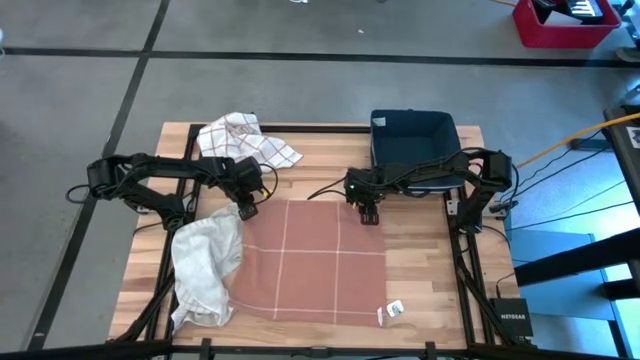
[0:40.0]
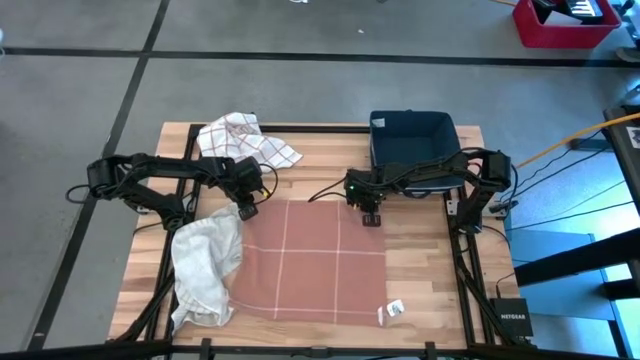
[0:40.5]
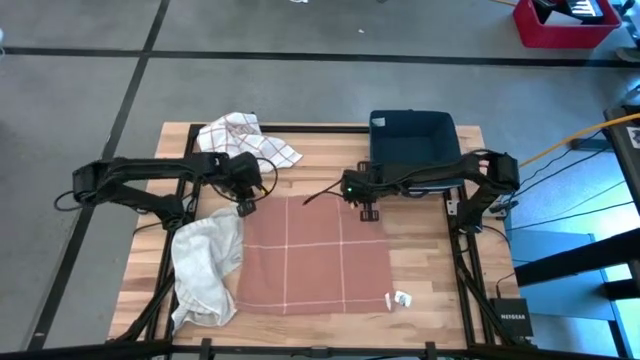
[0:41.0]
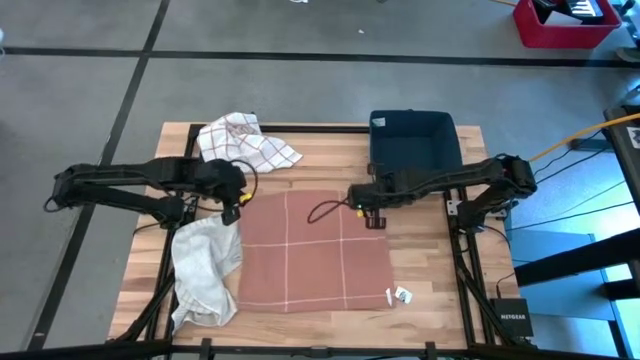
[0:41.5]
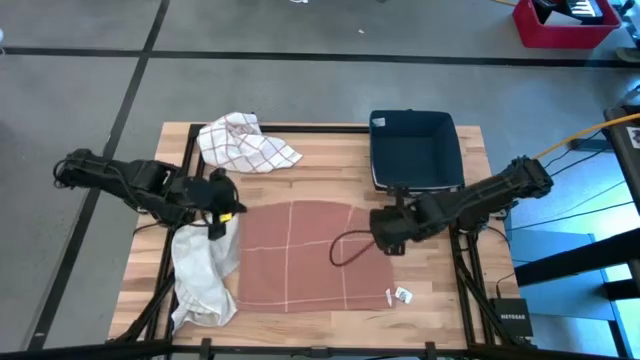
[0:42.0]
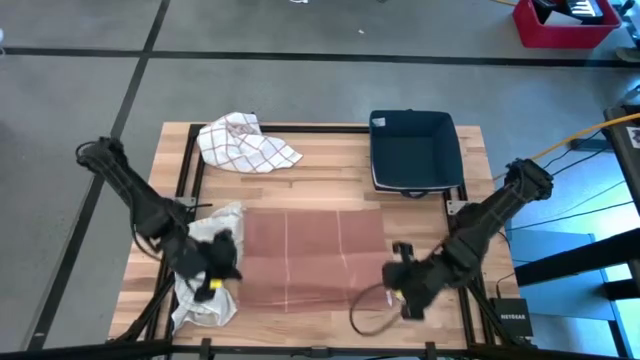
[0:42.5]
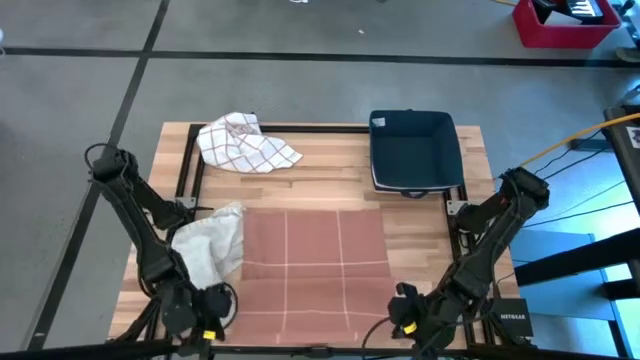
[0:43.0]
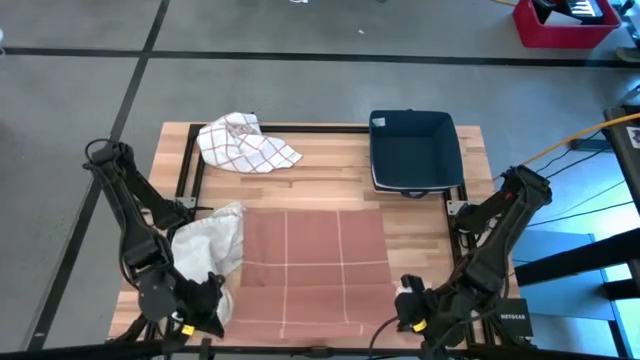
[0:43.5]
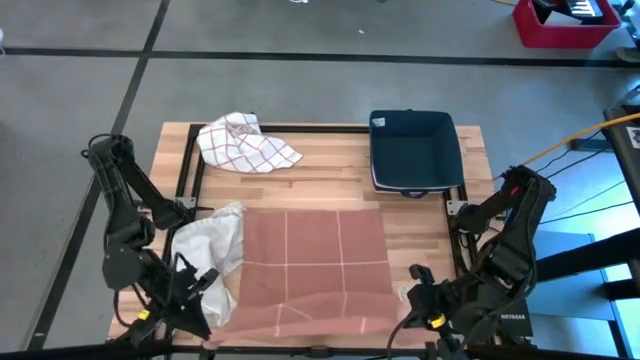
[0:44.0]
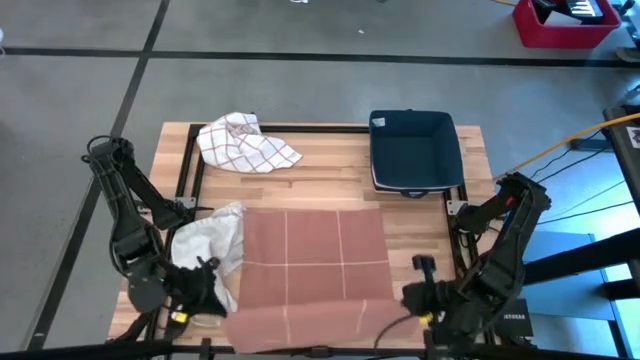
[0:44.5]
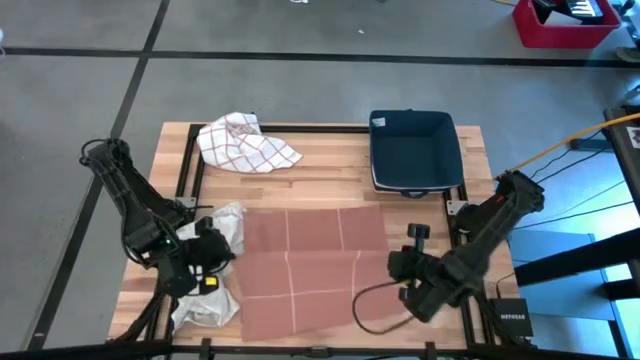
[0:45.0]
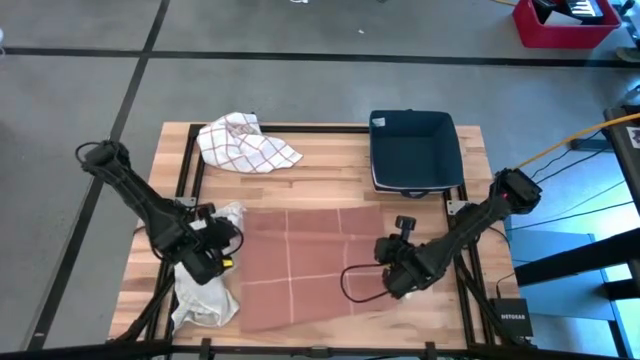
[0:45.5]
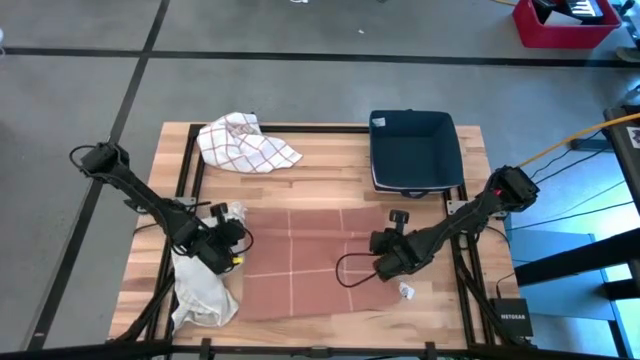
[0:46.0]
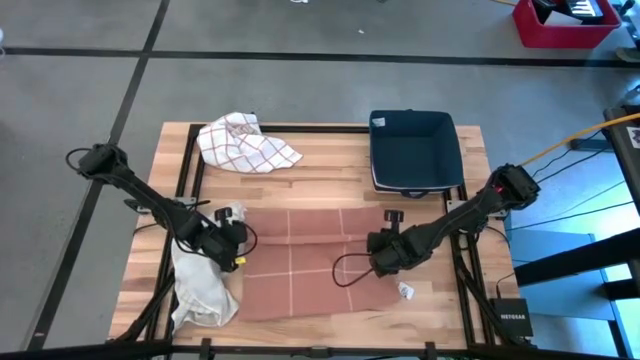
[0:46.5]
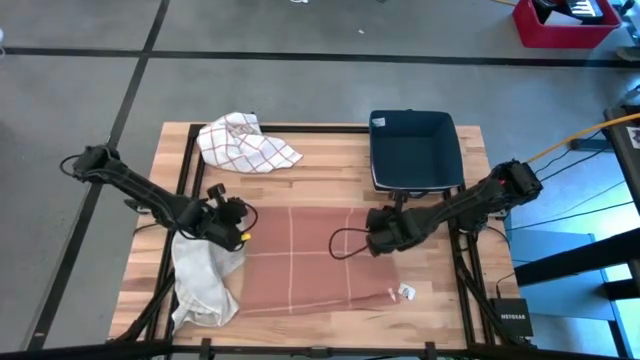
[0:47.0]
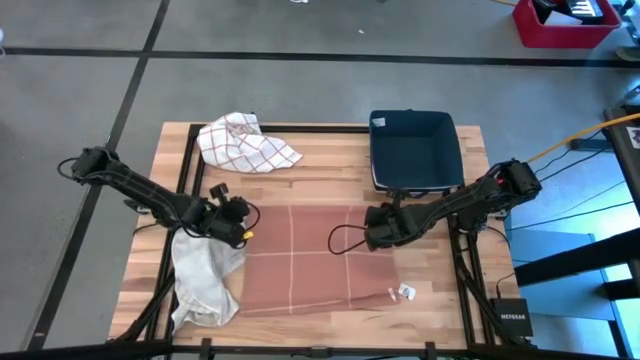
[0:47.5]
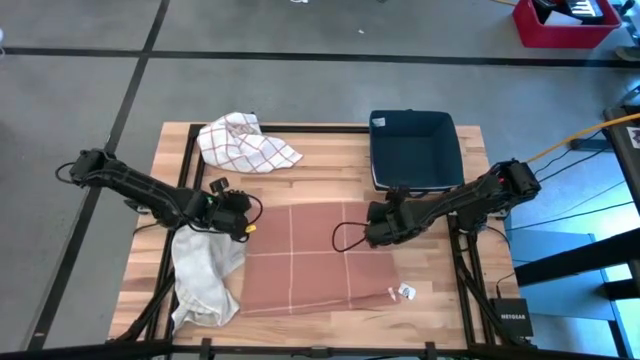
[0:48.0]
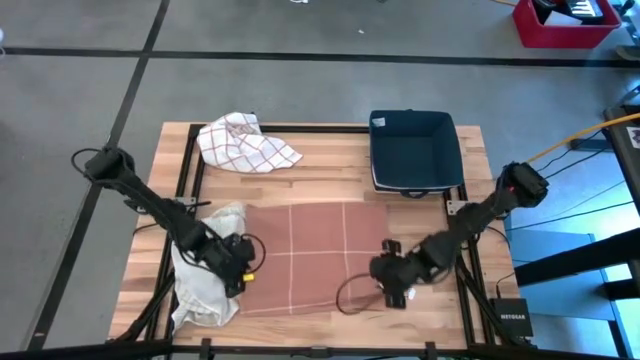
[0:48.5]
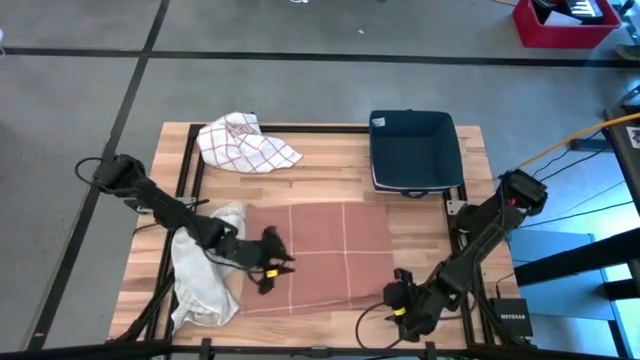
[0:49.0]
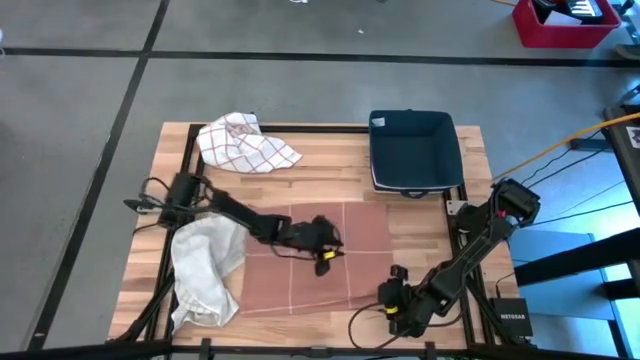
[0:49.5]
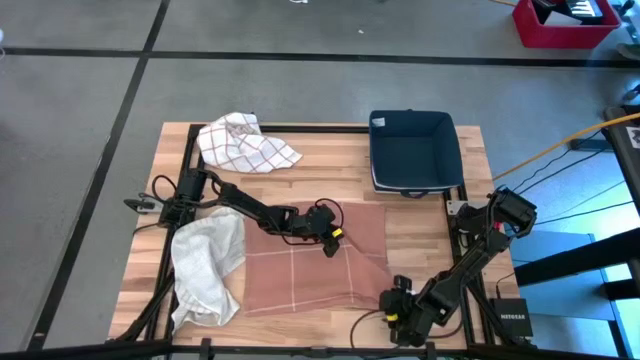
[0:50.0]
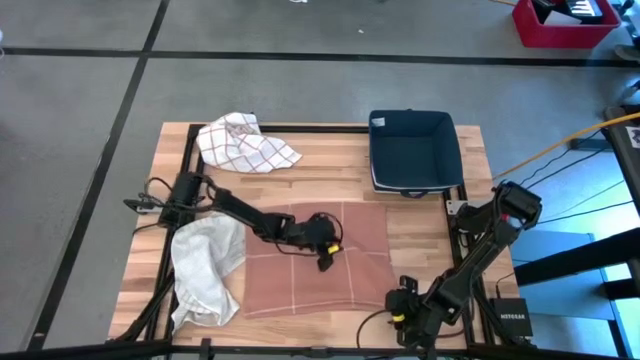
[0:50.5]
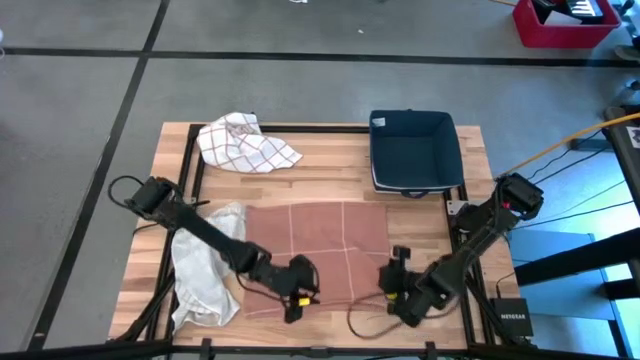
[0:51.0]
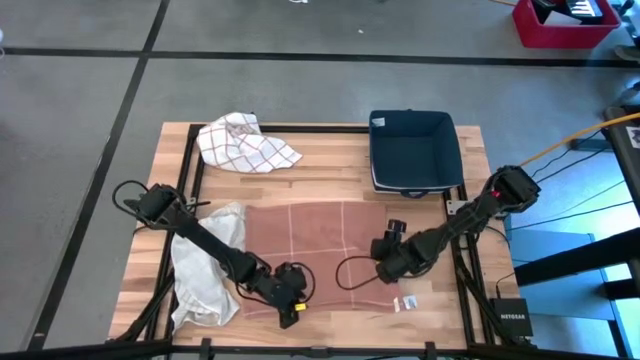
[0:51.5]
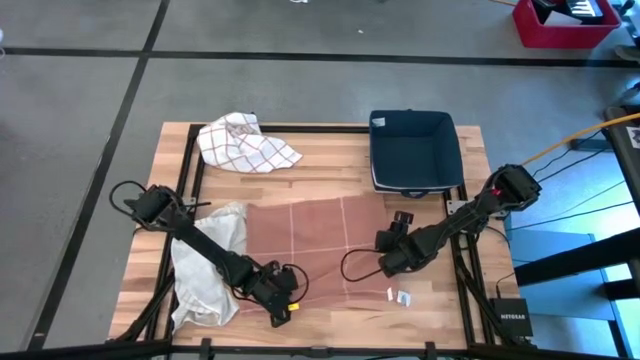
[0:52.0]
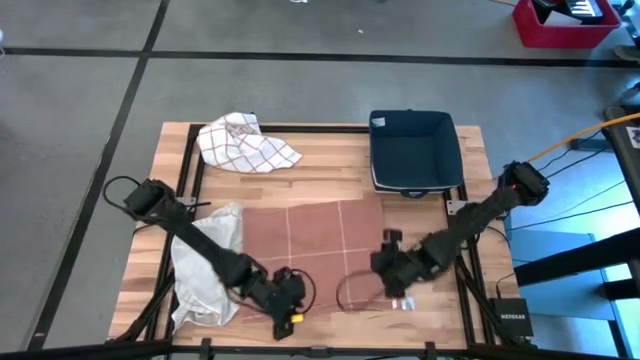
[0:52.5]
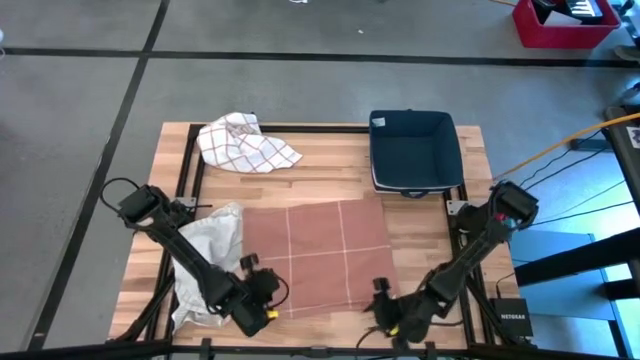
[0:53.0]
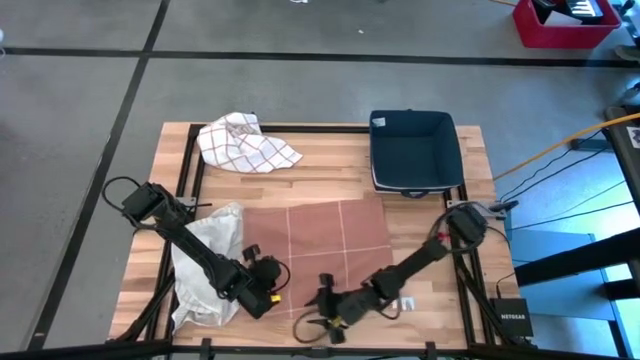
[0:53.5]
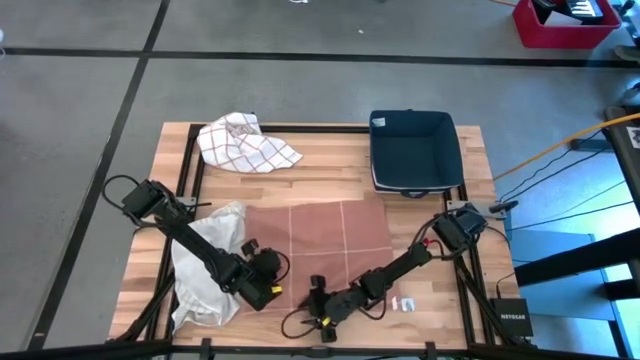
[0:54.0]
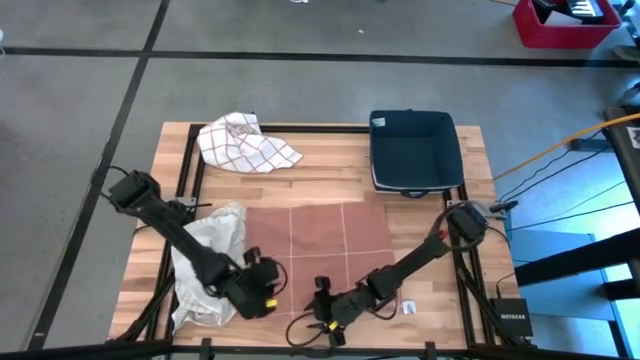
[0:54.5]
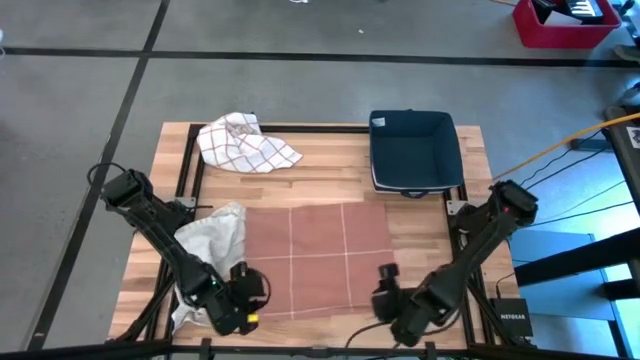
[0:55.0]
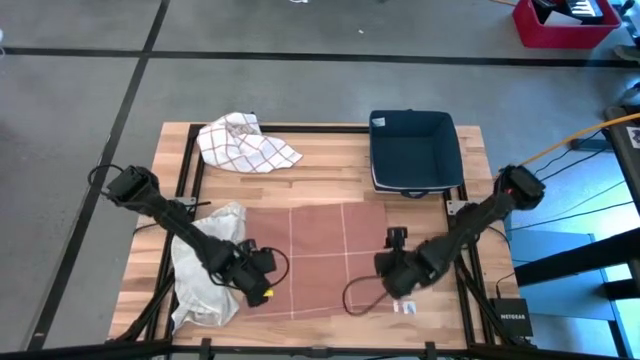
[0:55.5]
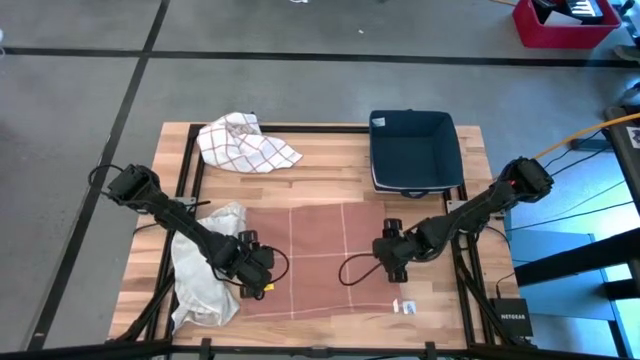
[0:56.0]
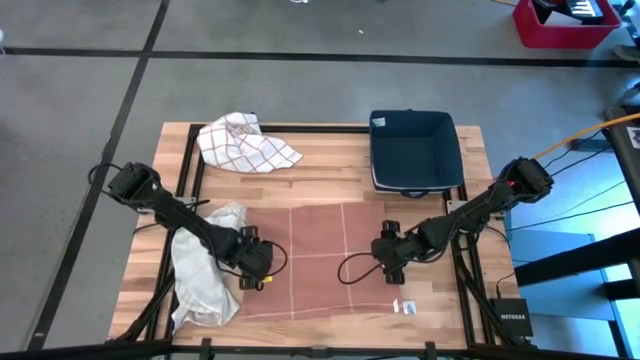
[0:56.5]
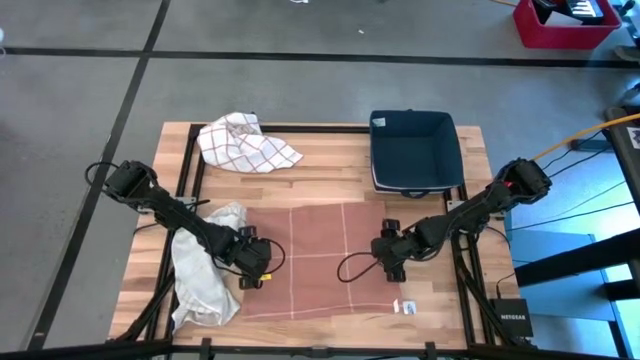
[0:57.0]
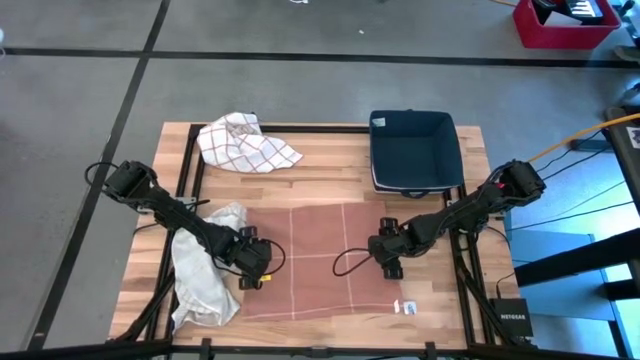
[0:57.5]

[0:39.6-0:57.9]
Task: Fold towel
Fold the brown towel

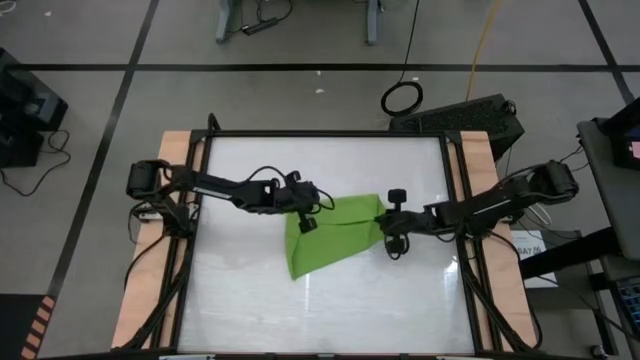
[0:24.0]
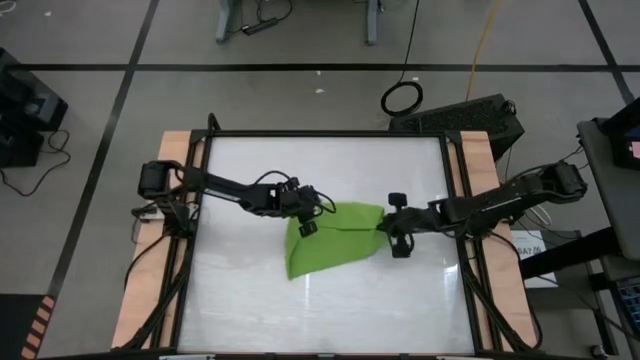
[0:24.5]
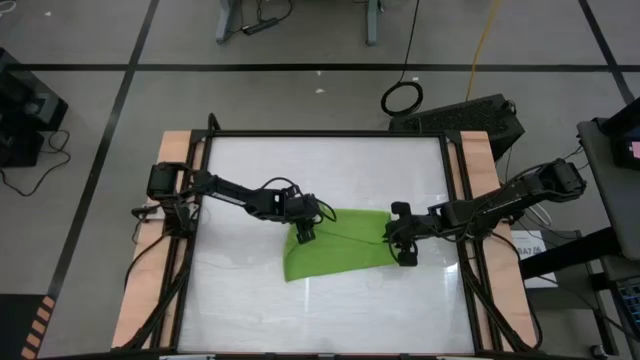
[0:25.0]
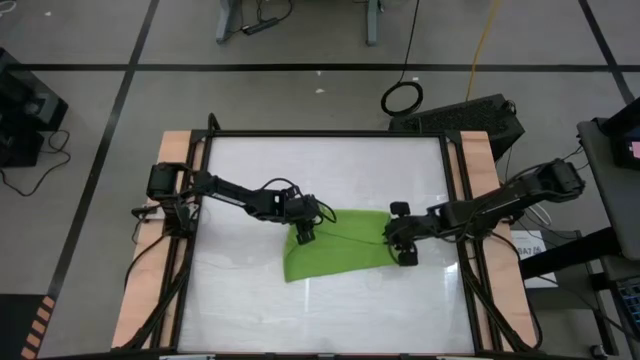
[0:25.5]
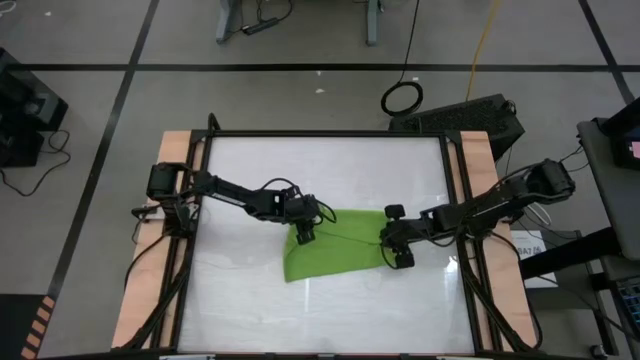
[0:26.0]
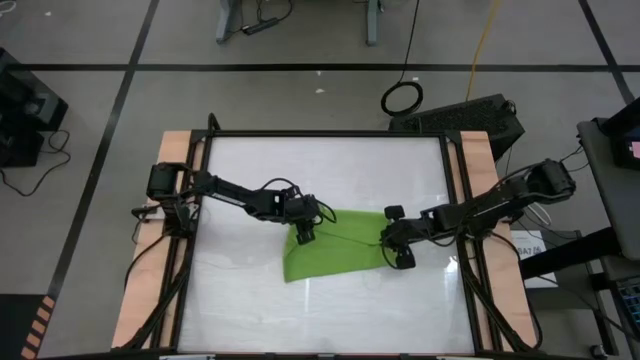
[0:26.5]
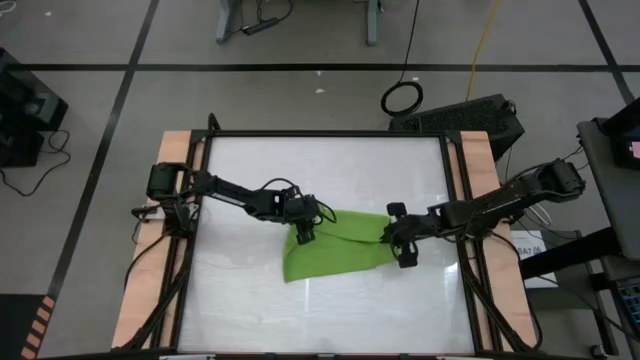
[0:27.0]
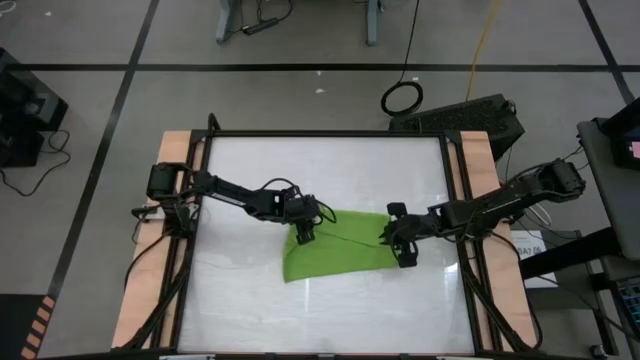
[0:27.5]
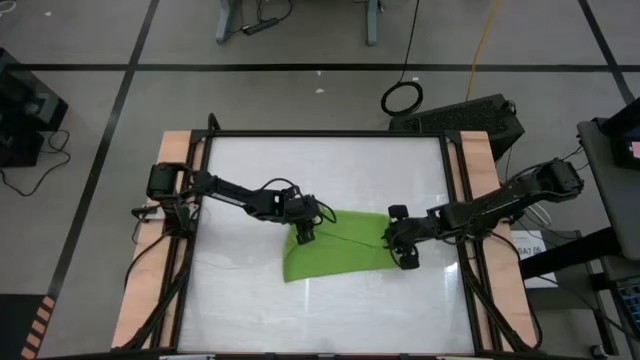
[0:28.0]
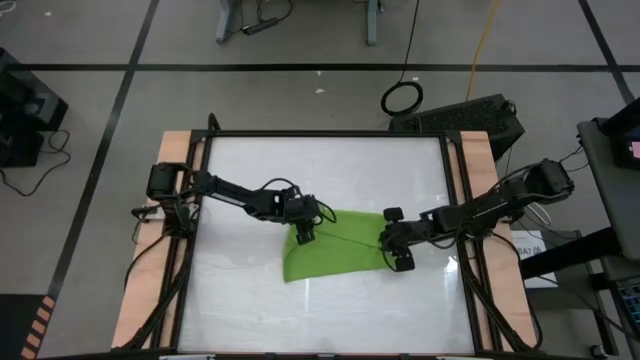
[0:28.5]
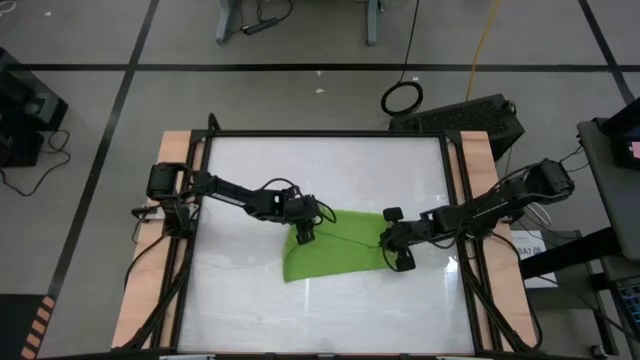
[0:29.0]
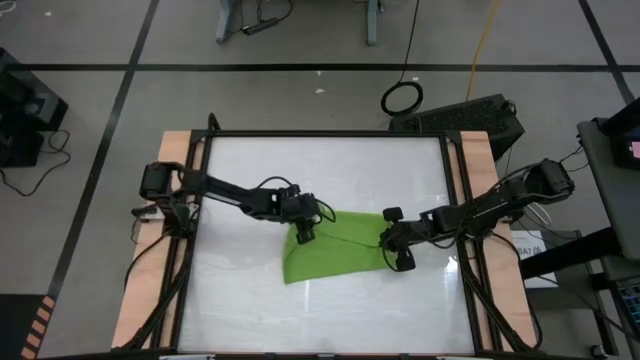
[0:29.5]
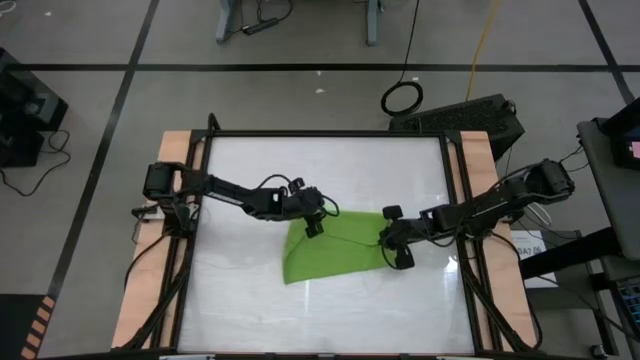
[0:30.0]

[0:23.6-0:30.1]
Task: Roll towel
Fold the green towel
